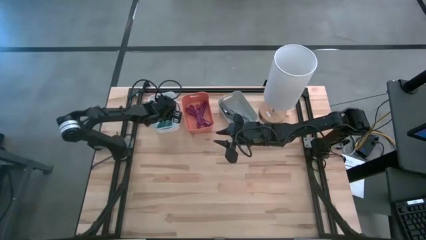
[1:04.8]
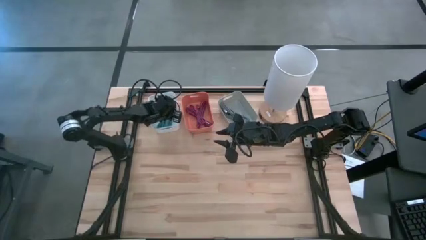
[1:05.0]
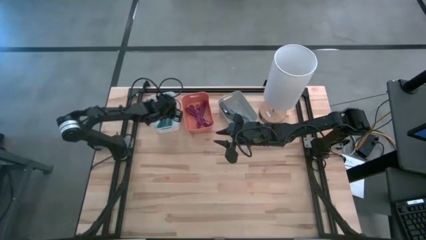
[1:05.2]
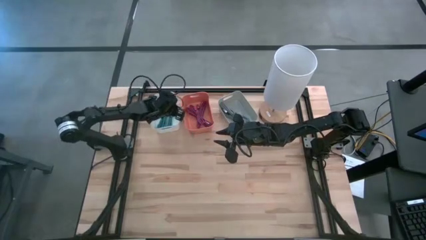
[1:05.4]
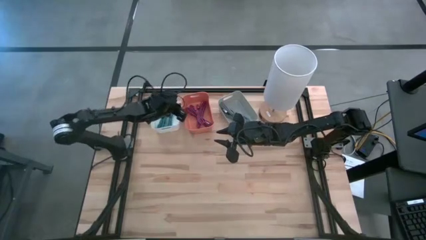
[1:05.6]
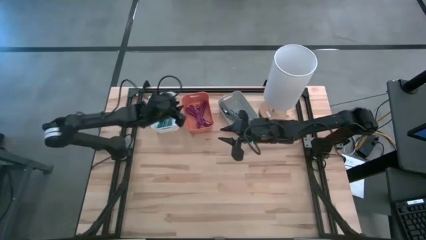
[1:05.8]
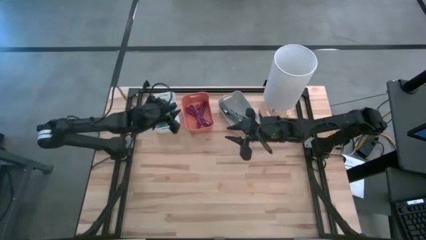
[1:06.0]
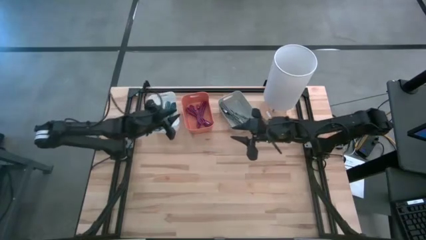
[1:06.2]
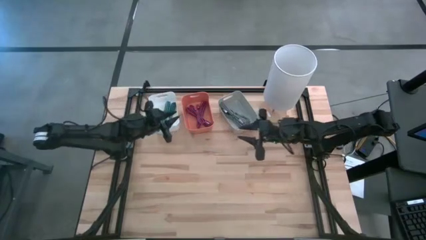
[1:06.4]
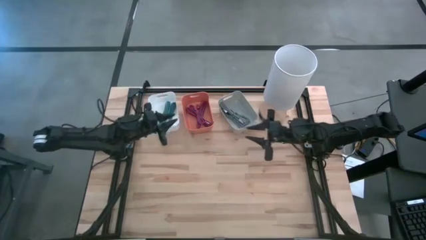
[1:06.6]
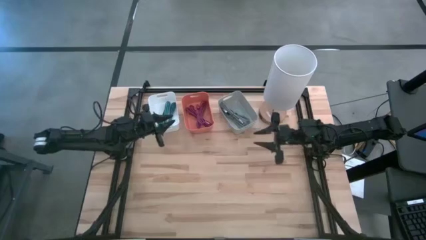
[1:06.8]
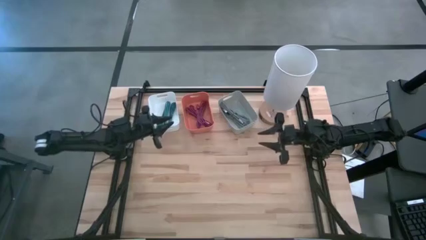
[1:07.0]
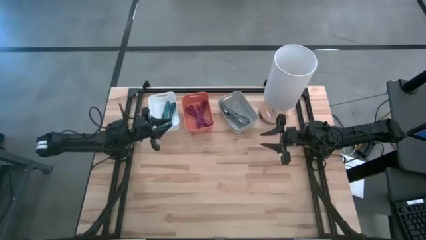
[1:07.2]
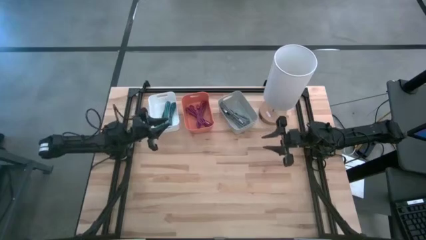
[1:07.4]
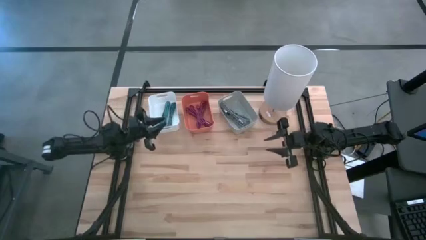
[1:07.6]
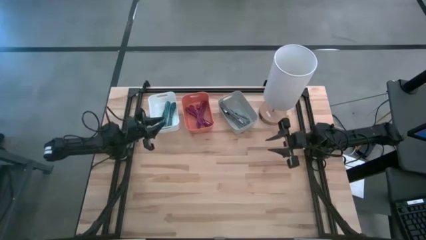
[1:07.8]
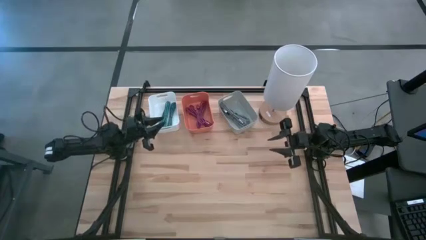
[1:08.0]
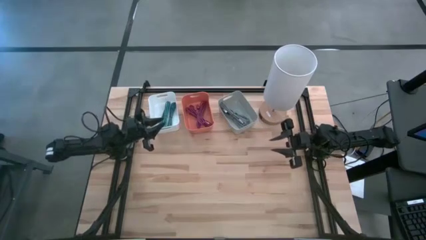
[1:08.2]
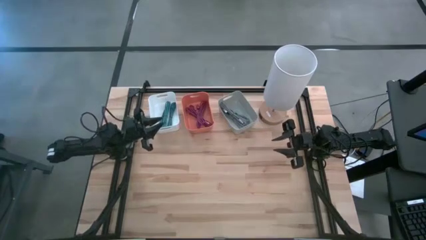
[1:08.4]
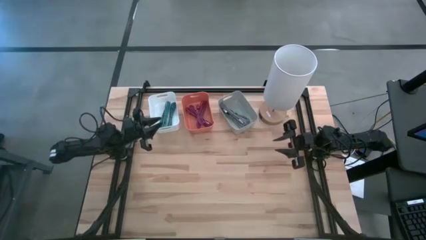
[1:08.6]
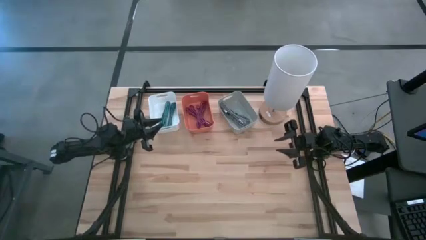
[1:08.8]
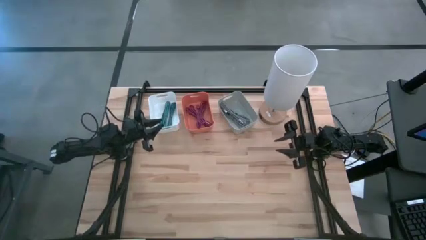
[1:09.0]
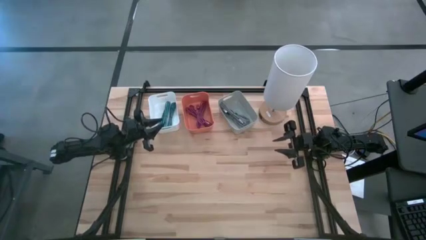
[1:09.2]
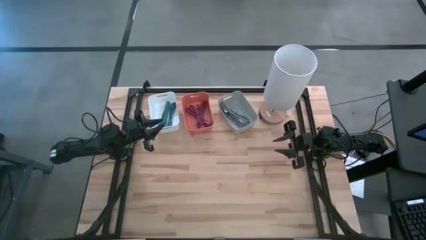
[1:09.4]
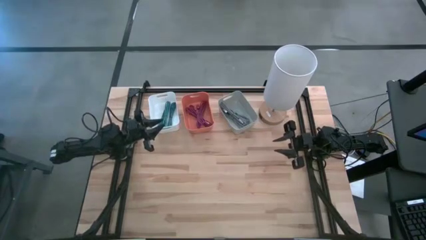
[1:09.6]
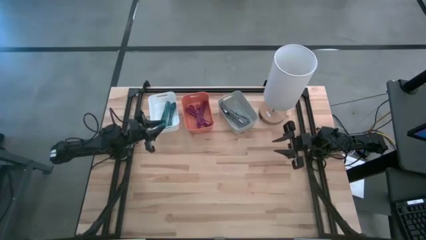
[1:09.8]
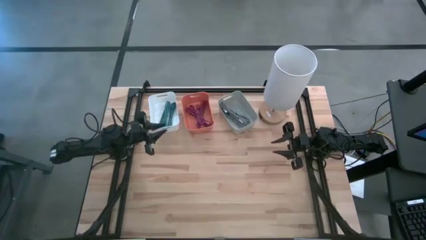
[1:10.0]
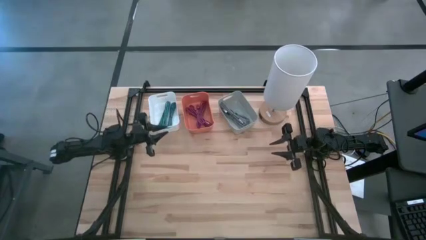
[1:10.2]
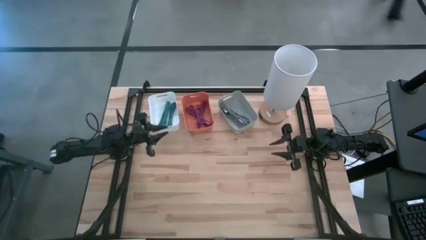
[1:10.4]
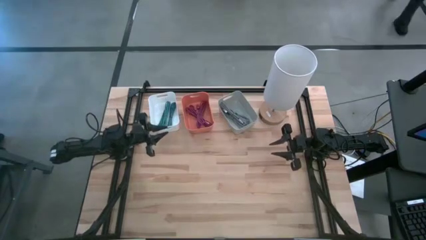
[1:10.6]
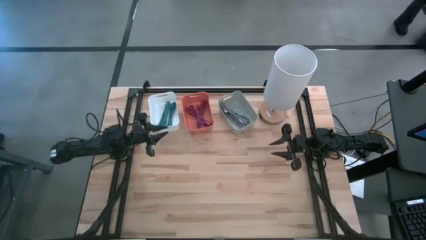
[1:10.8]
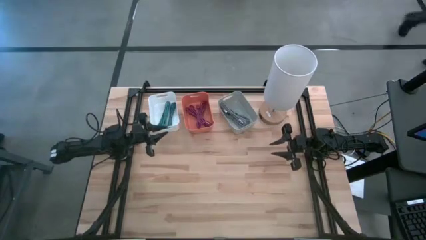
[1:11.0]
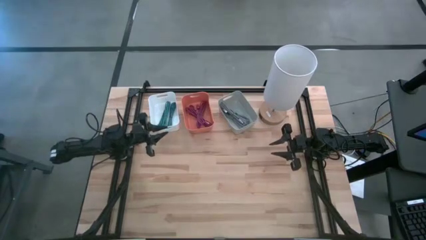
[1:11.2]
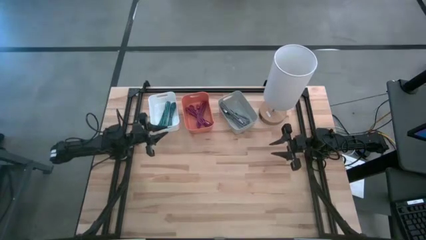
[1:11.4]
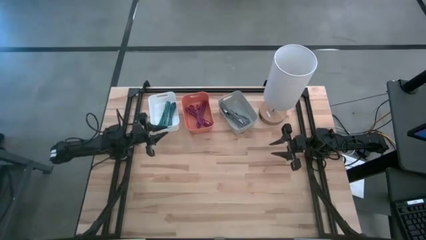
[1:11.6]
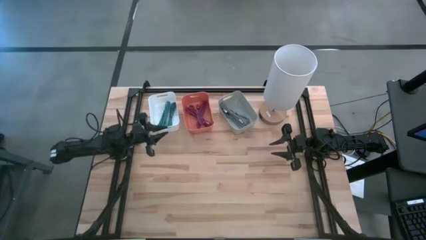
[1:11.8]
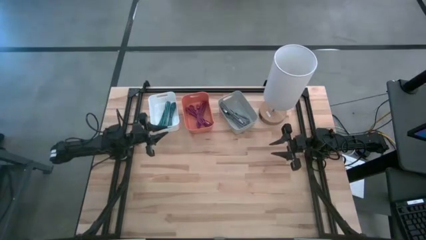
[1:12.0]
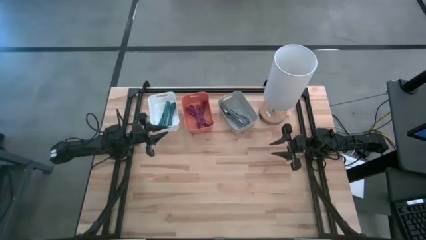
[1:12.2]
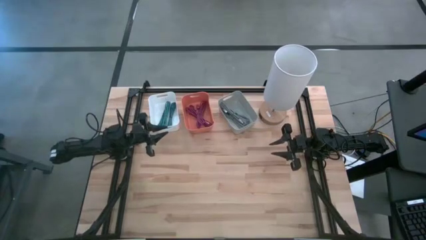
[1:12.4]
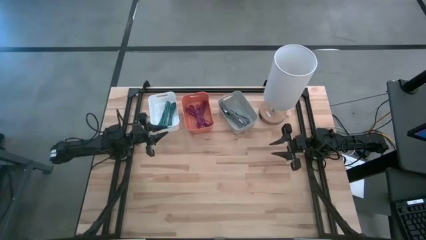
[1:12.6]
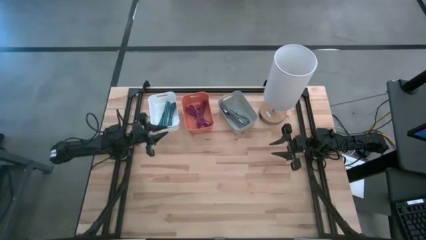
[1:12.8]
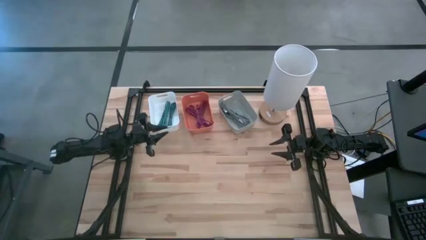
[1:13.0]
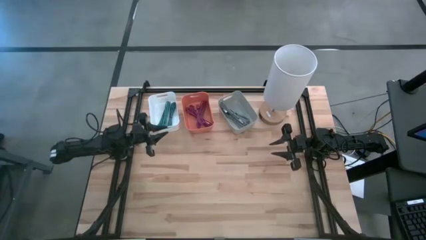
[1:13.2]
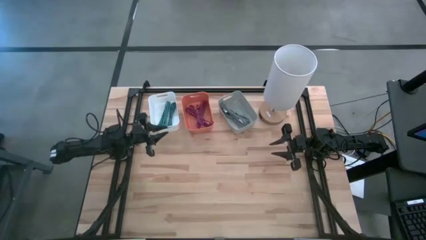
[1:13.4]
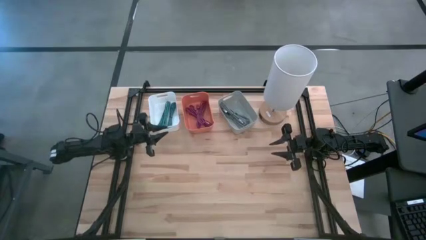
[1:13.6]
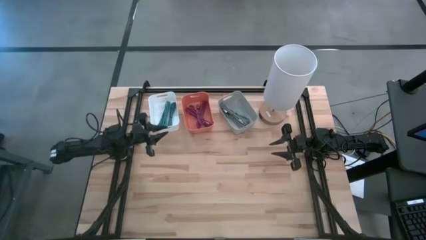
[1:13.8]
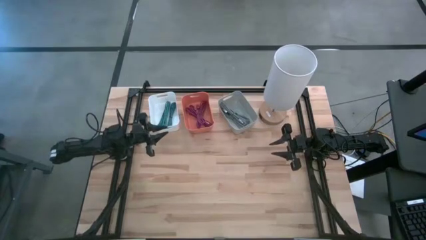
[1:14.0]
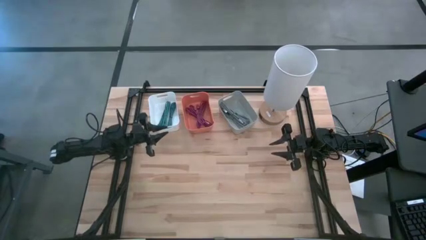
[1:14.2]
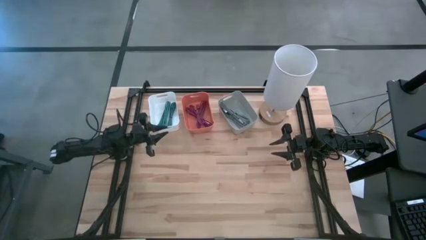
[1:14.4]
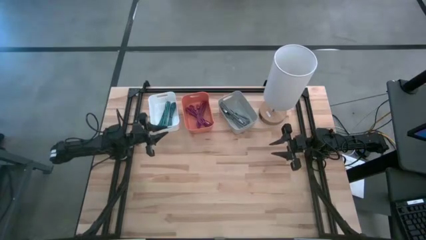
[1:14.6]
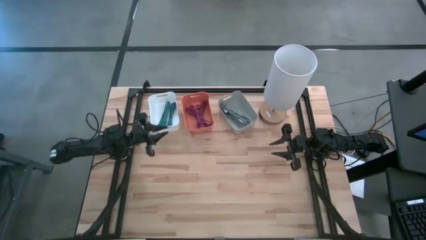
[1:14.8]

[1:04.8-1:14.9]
Task: Pick & Place USB Port
Return to Home Position

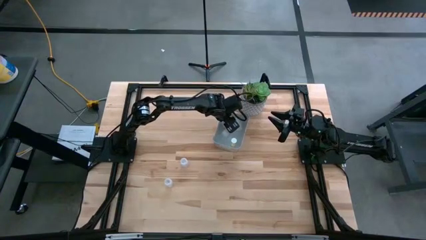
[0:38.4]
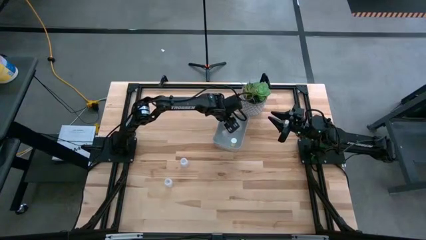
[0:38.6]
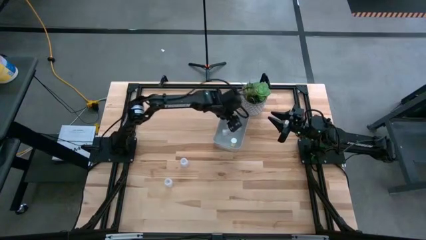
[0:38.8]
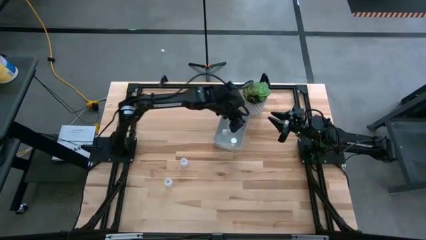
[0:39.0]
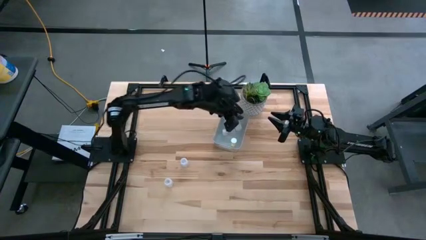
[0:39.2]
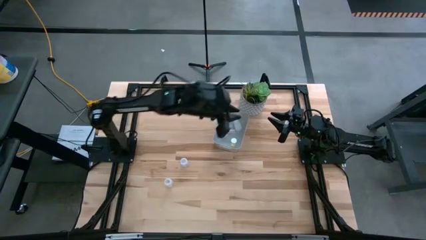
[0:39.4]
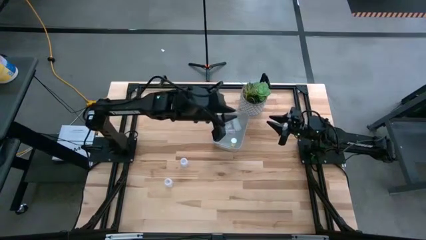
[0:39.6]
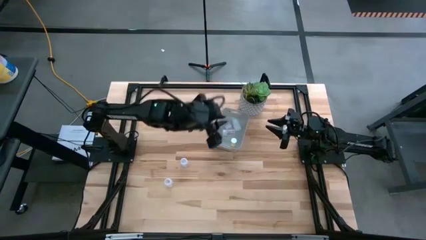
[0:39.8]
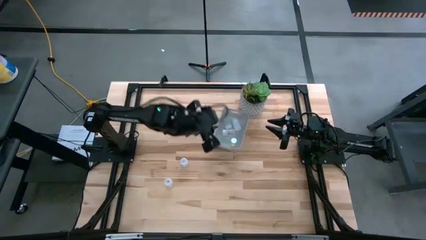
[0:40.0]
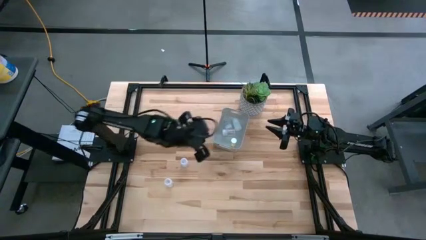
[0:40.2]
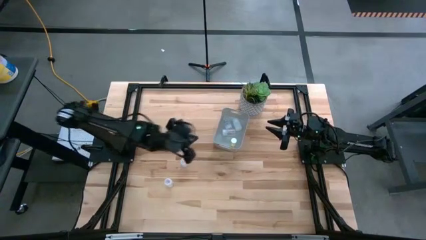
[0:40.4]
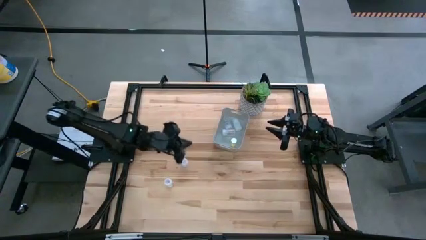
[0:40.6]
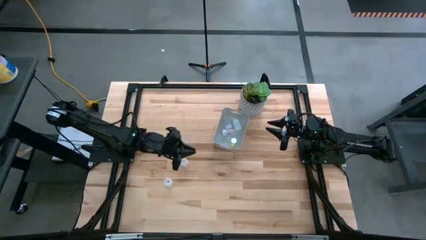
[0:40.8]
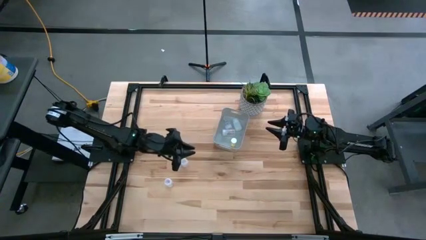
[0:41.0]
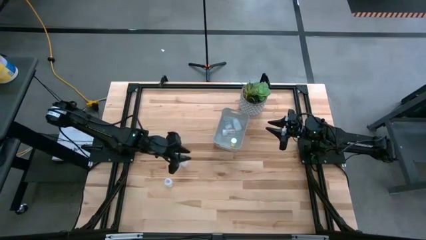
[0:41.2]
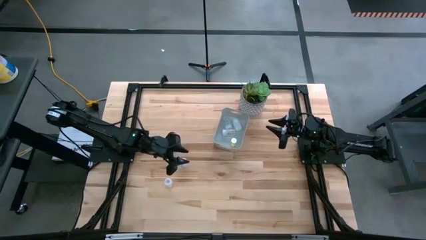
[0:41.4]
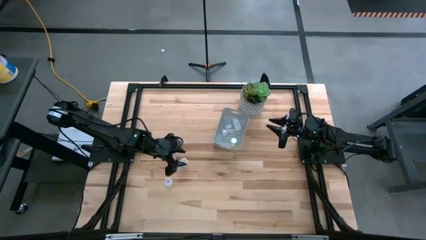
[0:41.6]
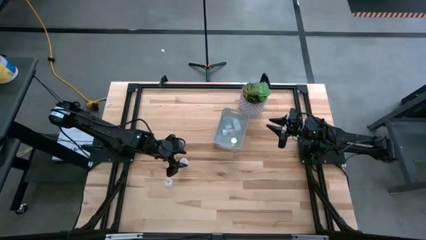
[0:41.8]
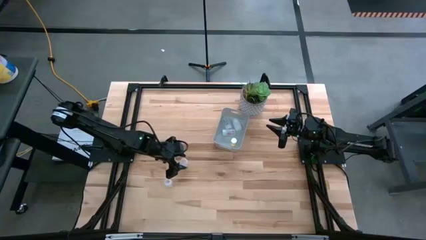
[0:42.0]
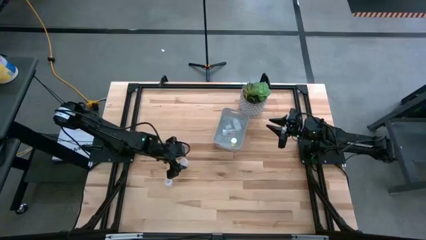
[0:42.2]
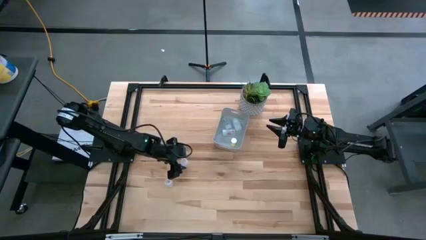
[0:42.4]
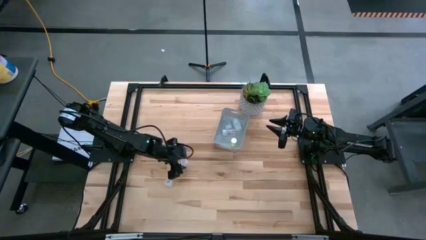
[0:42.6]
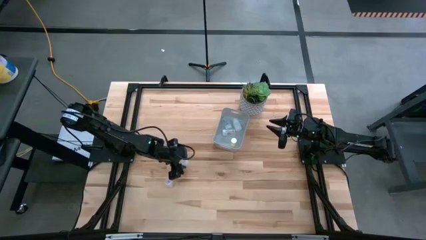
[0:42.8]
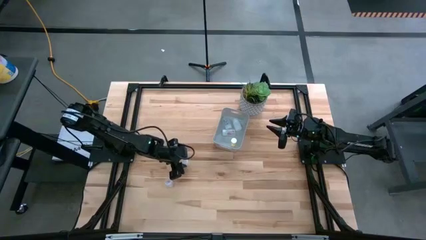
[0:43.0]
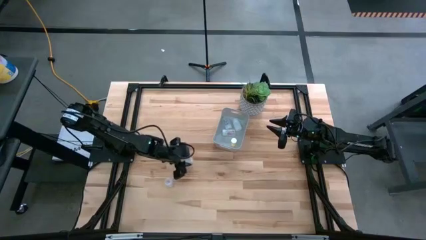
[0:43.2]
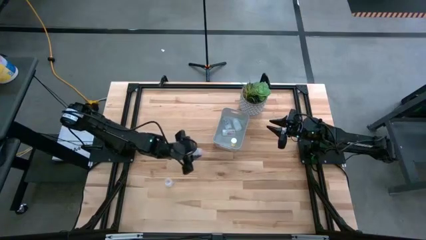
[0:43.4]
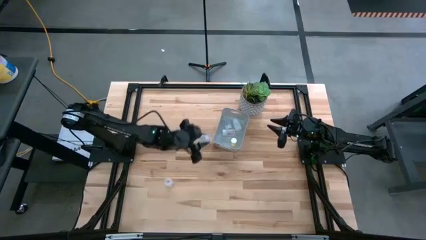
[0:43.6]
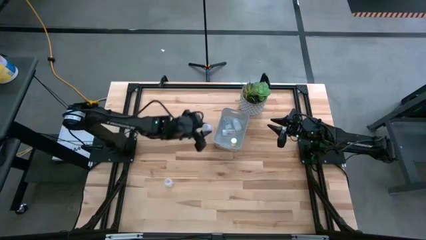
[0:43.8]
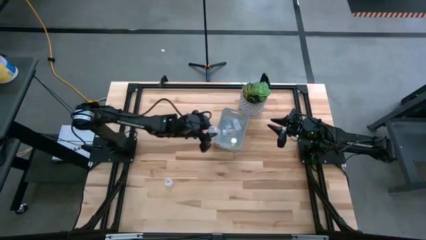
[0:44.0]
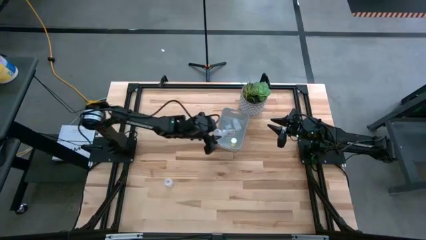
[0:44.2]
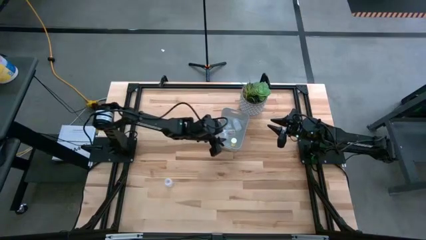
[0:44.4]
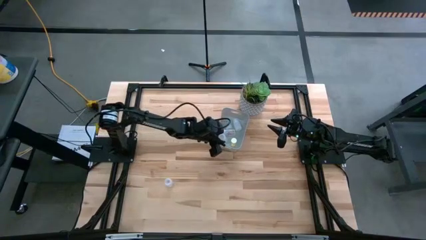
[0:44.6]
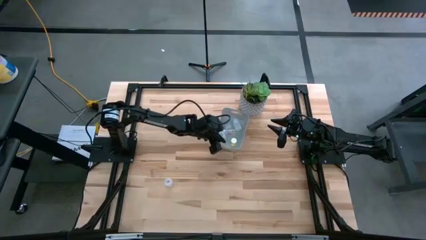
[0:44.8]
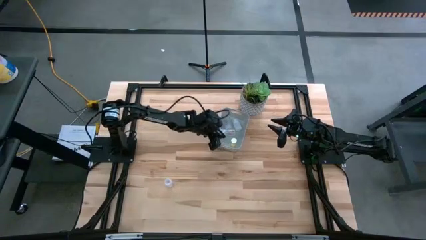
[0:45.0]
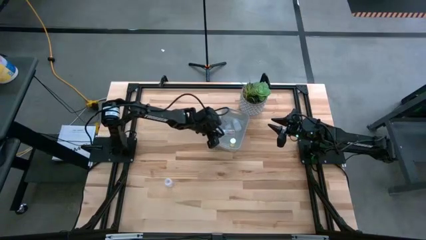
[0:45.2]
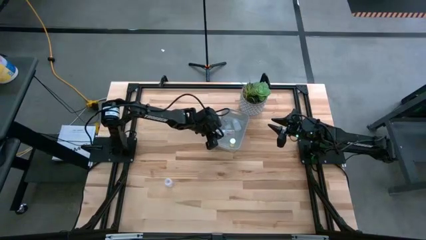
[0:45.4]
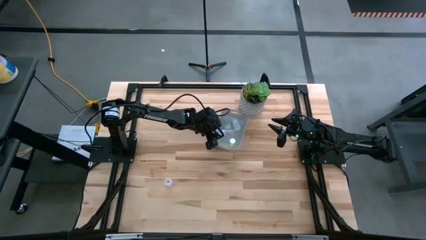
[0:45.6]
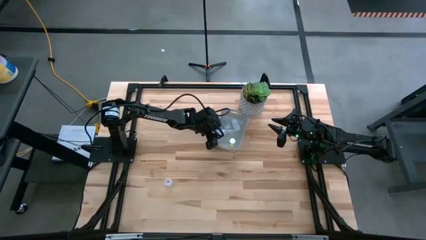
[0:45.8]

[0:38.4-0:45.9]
Task: Pick and place pill bottles into a basket
Put the transparent pill bottle into the white bin
